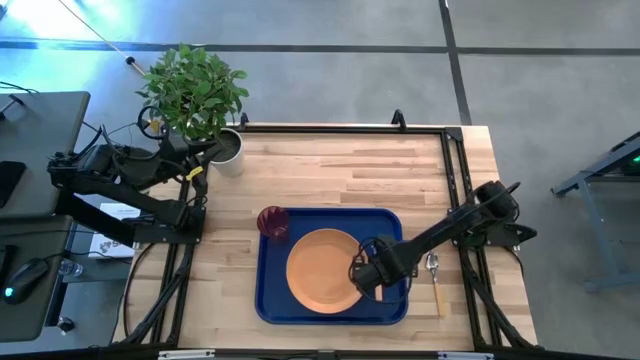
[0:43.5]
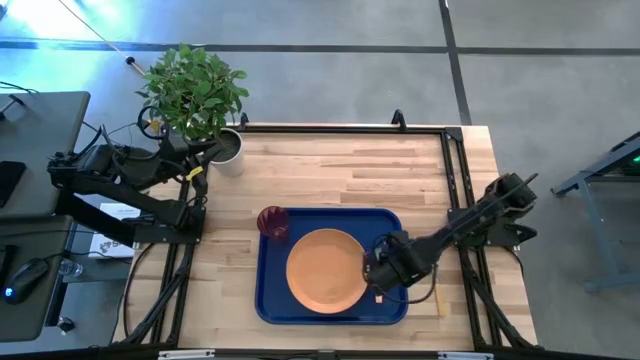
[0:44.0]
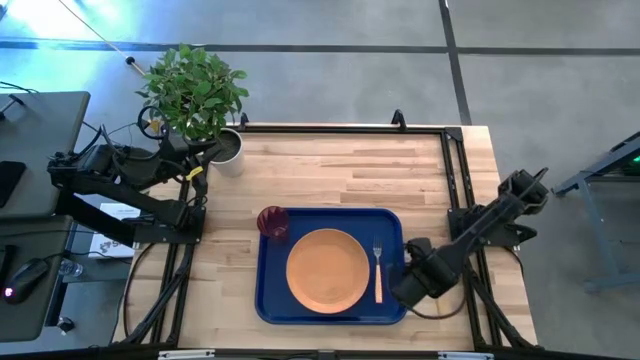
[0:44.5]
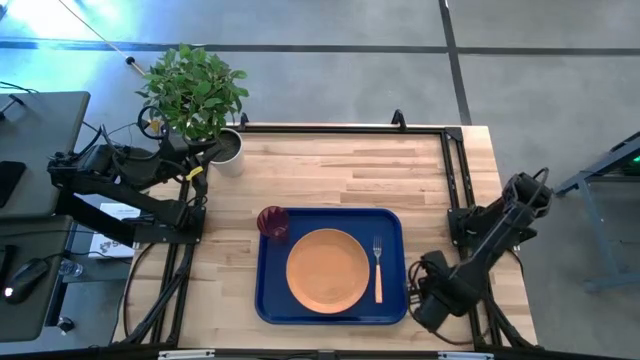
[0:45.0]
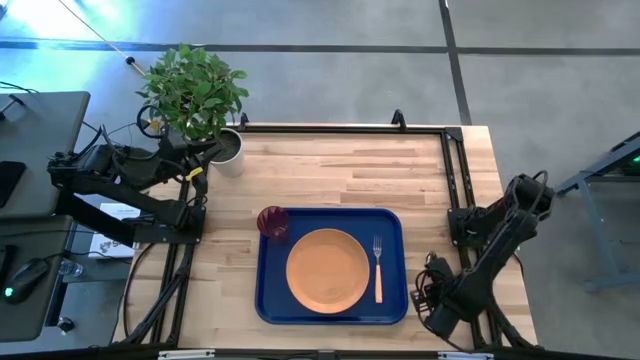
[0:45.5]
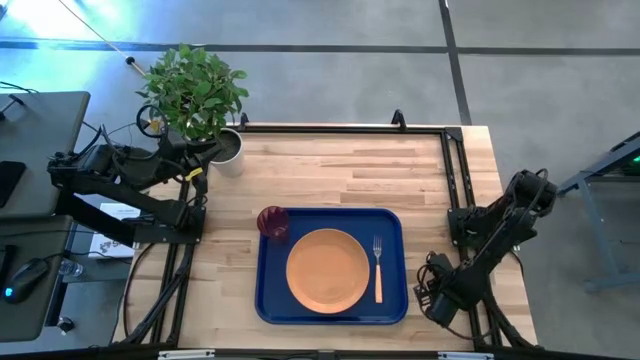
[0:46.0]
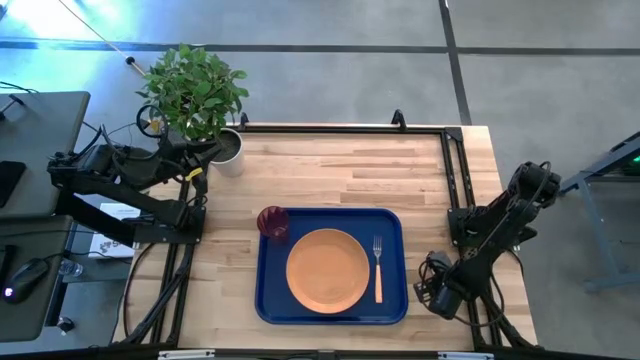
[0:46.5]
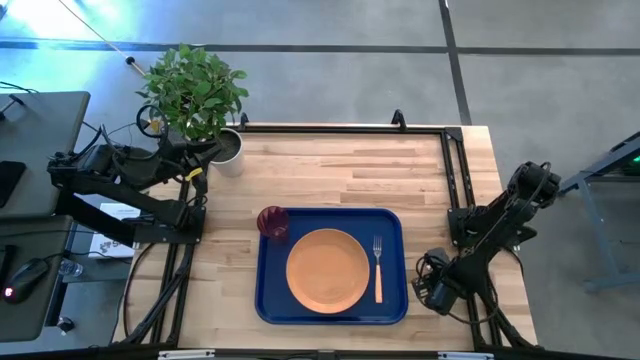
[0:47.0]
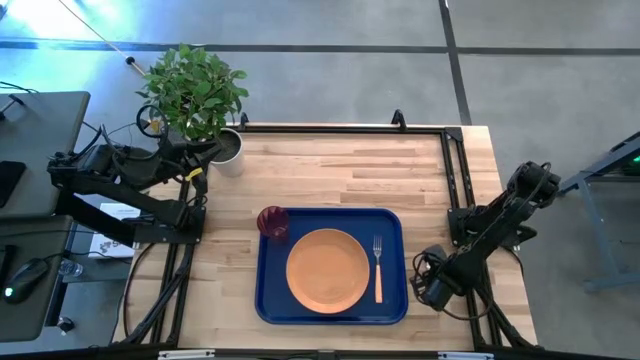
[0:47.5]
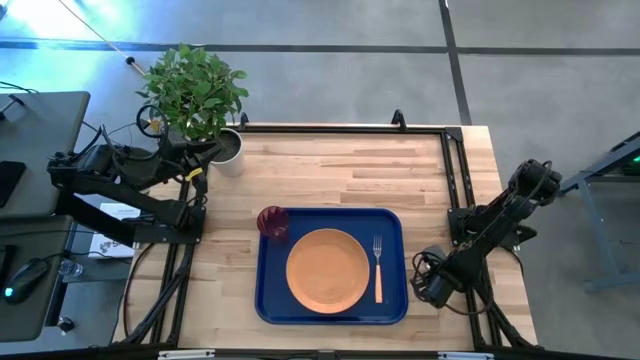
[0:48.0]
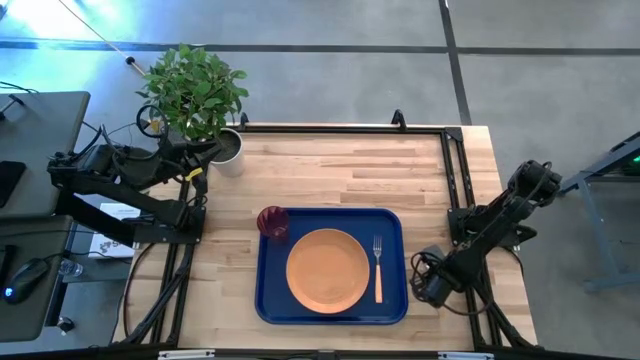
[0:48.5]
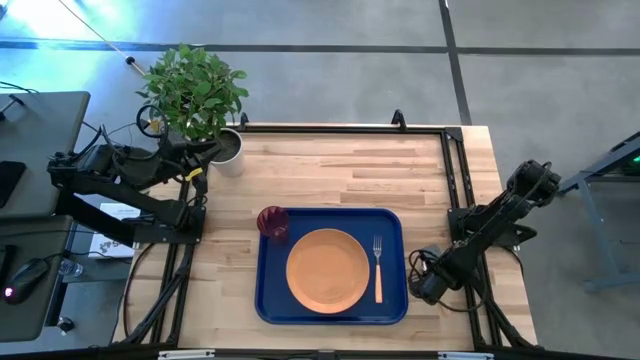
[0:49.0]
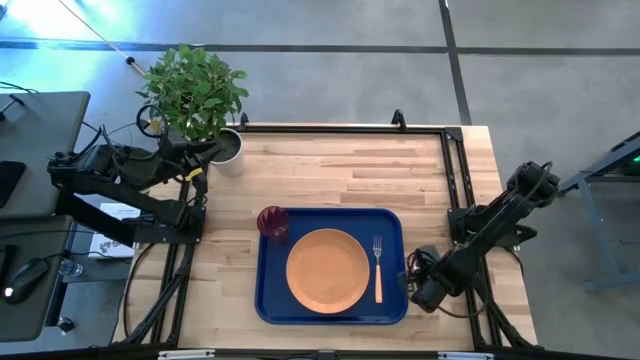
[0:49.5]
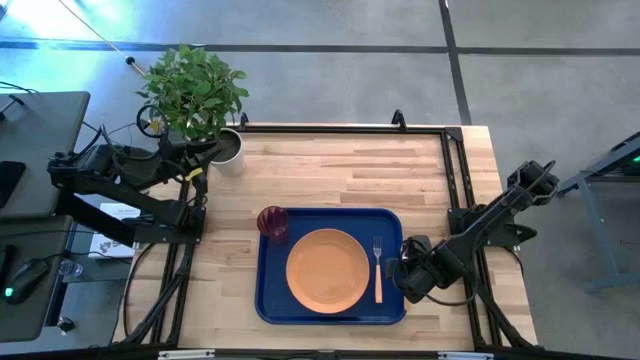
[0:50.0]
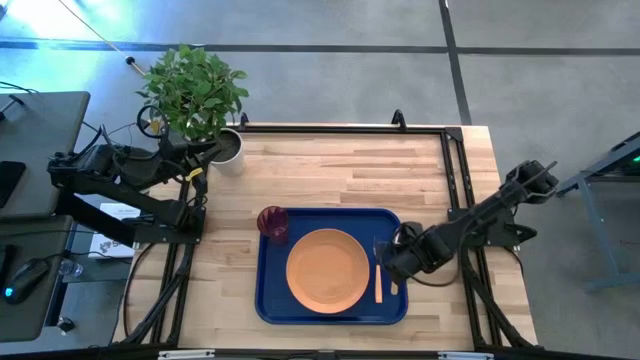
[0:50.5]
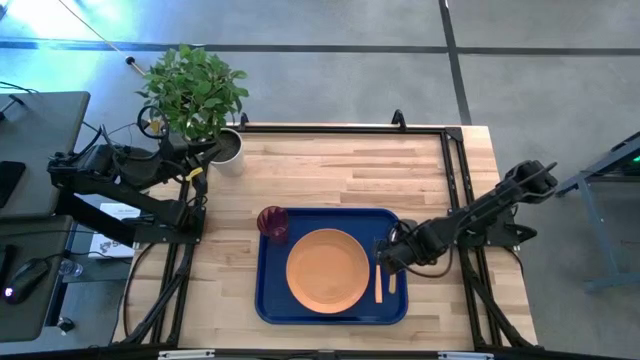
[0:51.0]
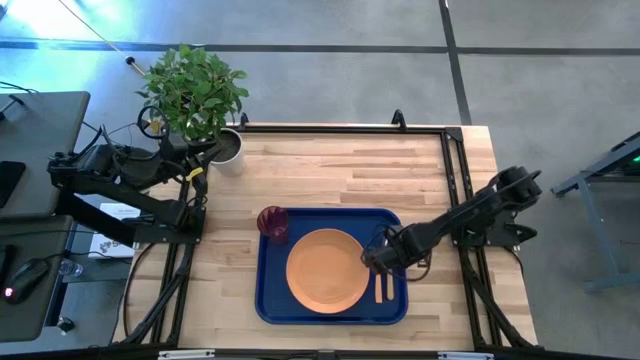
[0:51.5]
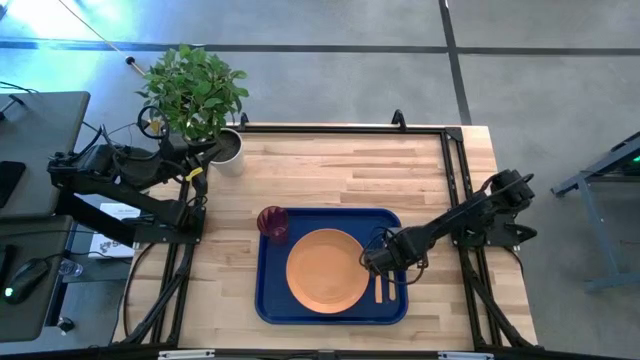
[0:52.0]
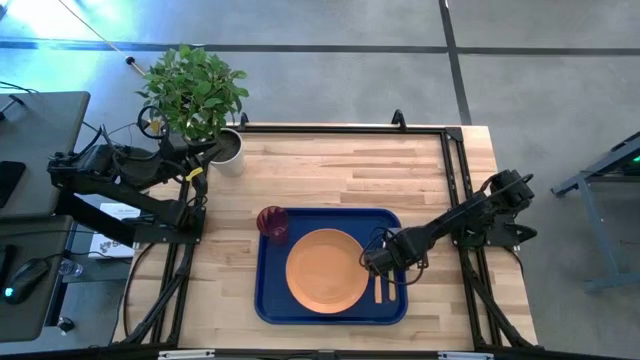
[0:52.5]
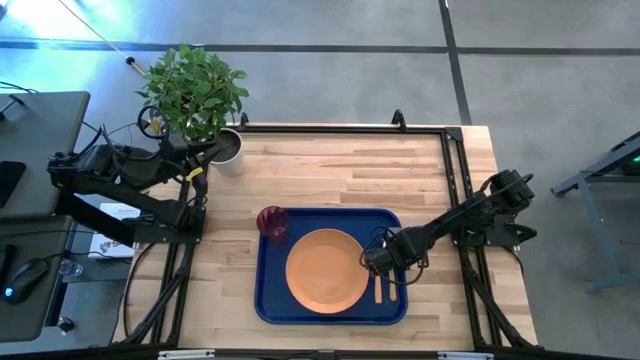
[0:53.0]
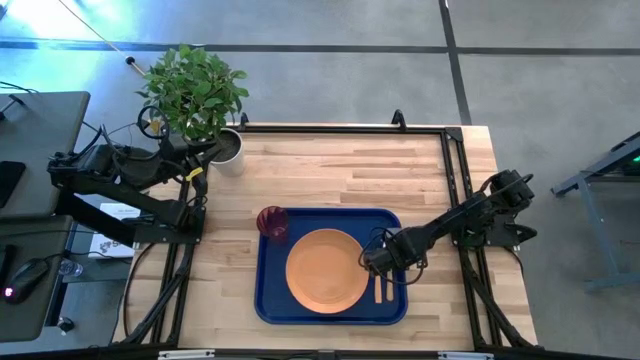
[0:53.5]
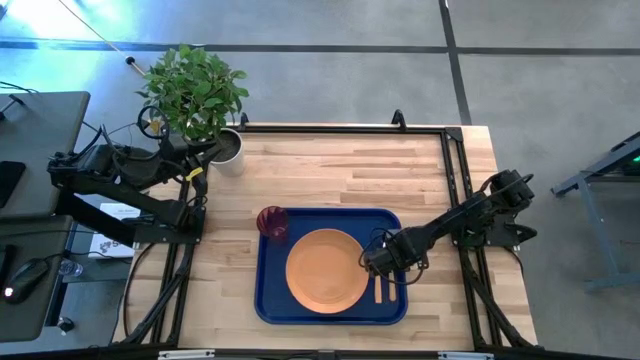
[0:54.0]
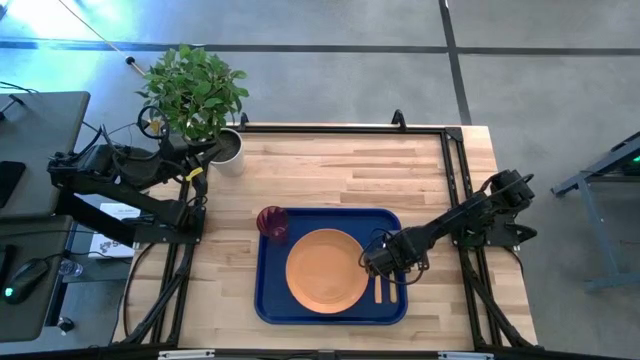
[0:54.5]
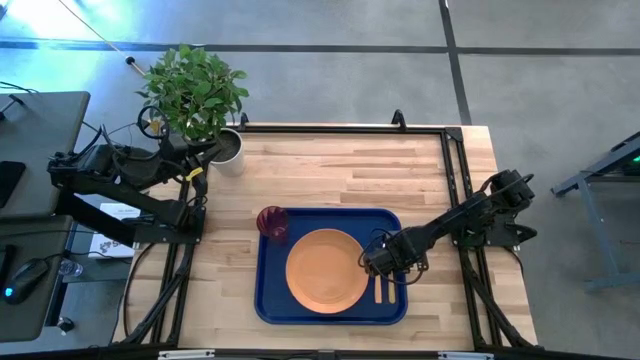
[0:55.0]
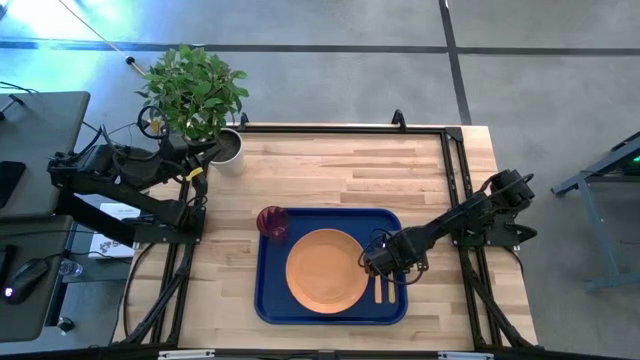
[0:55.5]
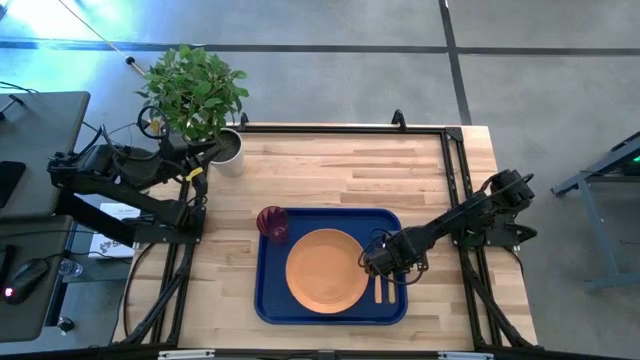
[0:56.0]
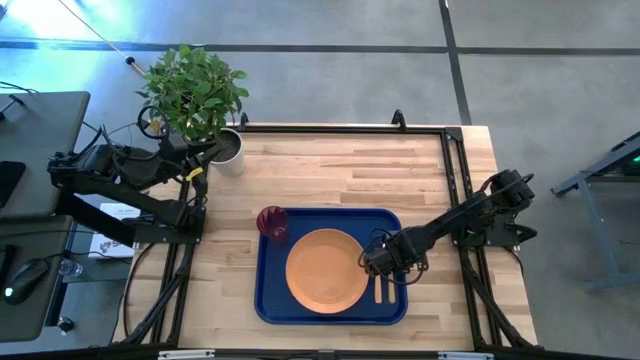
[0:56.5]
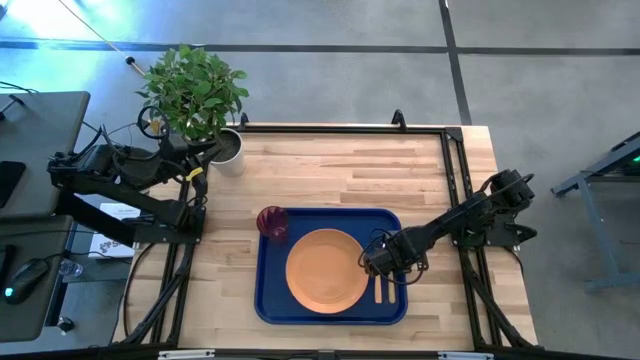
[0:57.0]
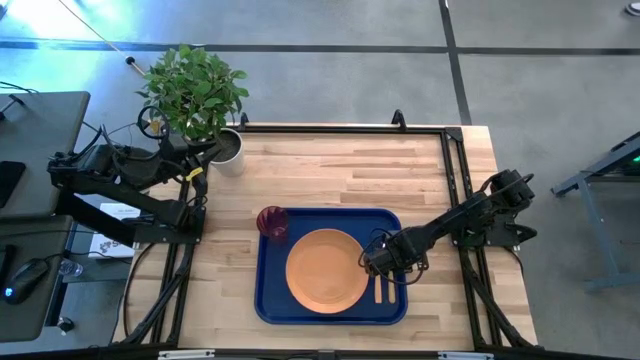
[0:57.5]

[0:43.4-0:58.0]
Task: Pick and place plate/cup/fork/spoon on tray
Put the orange spoon on the right side of the light orange fork

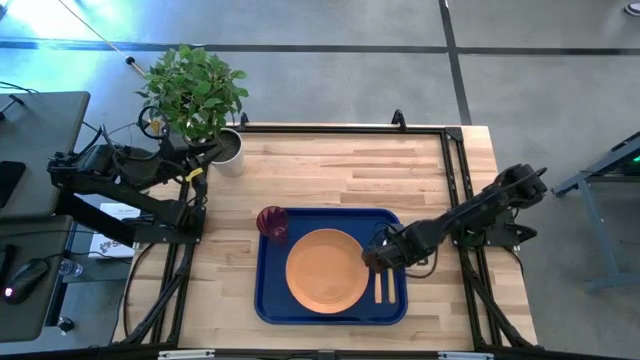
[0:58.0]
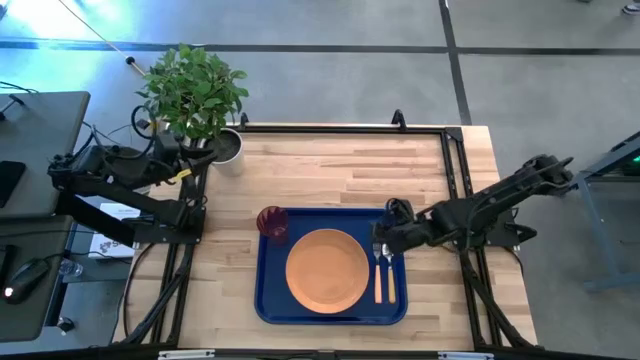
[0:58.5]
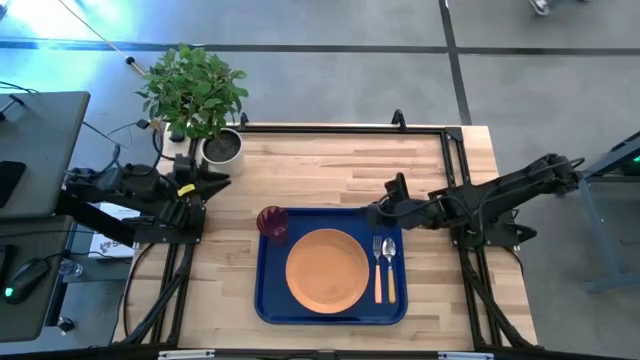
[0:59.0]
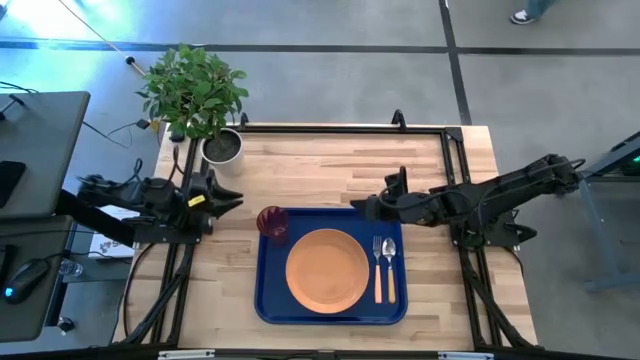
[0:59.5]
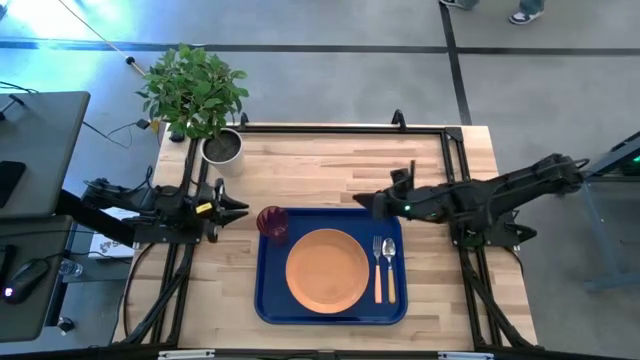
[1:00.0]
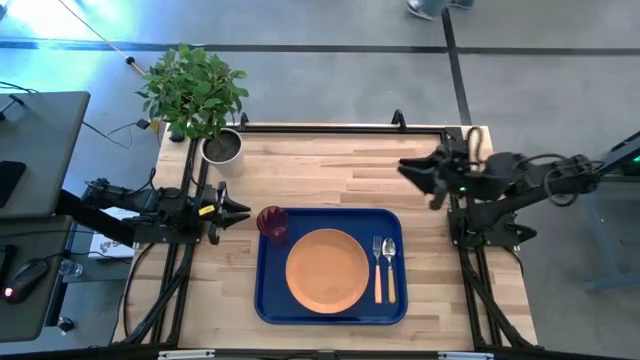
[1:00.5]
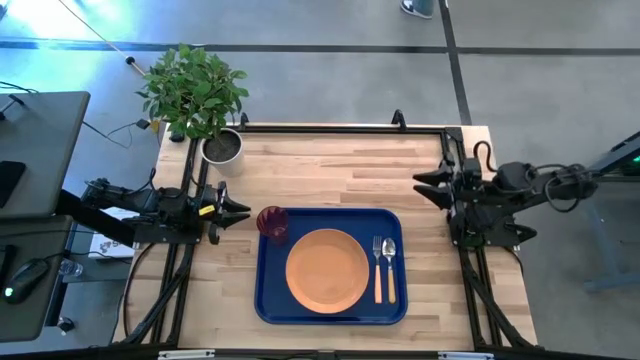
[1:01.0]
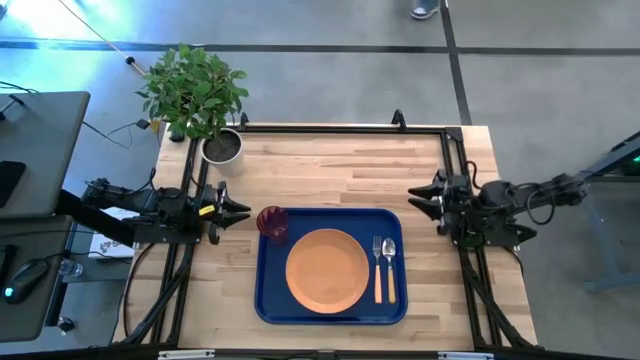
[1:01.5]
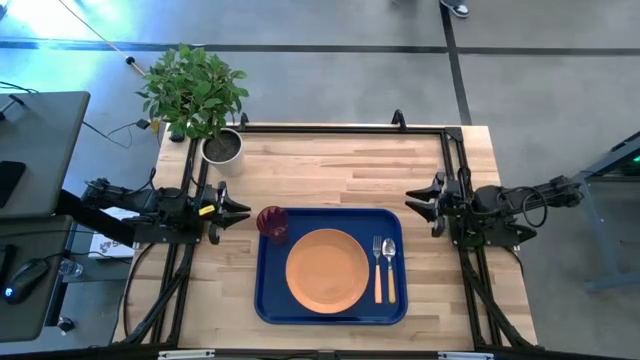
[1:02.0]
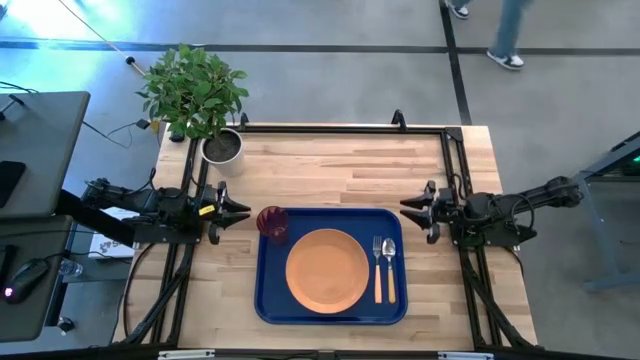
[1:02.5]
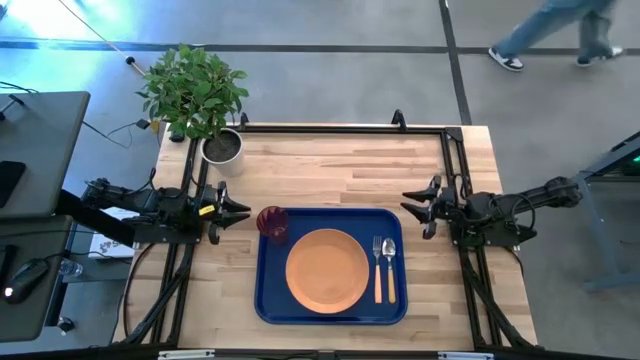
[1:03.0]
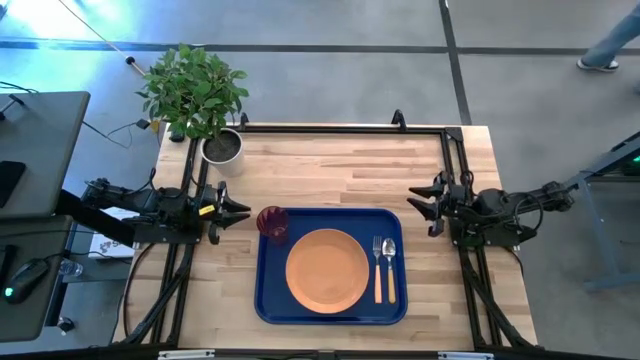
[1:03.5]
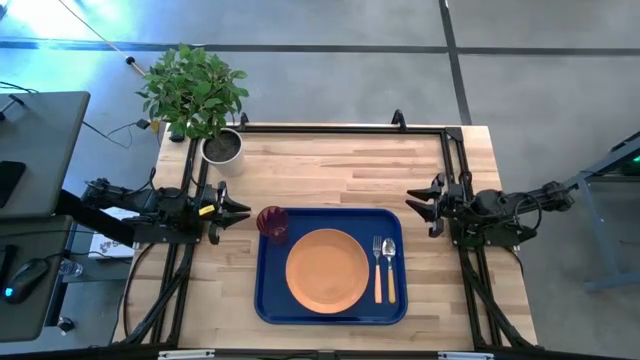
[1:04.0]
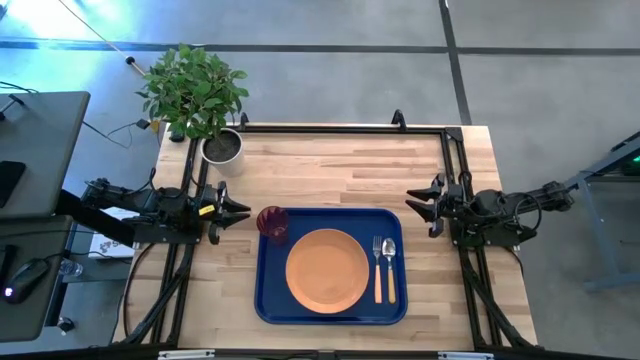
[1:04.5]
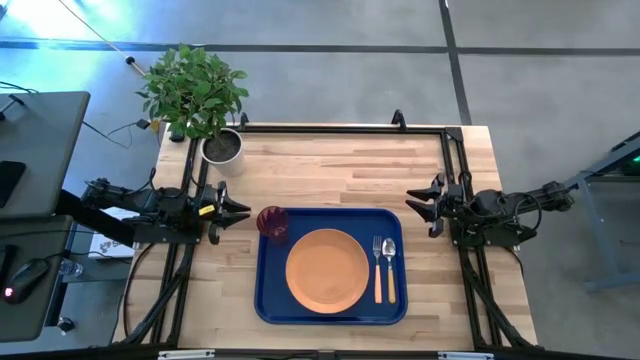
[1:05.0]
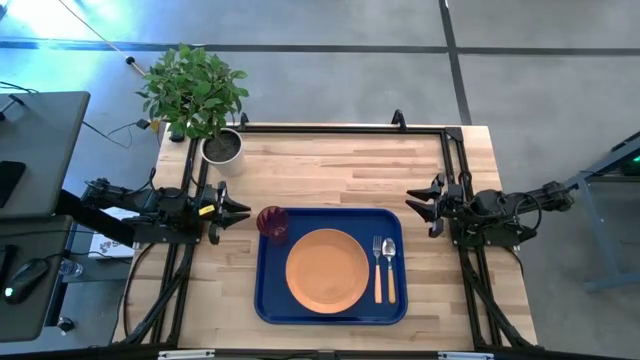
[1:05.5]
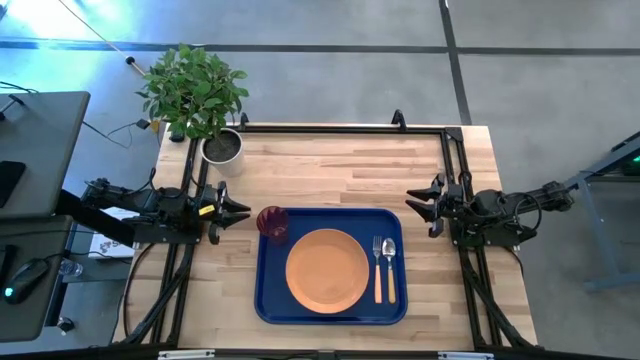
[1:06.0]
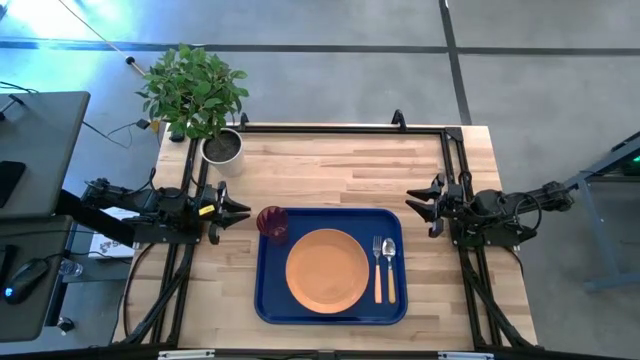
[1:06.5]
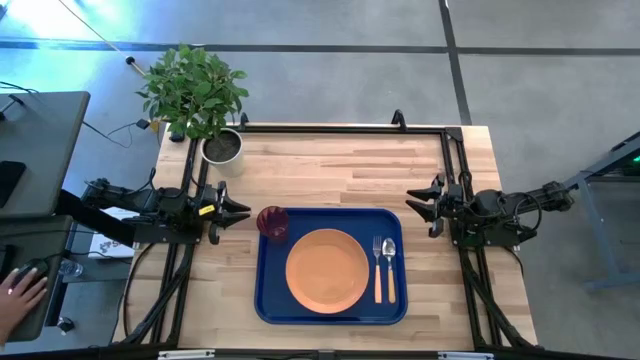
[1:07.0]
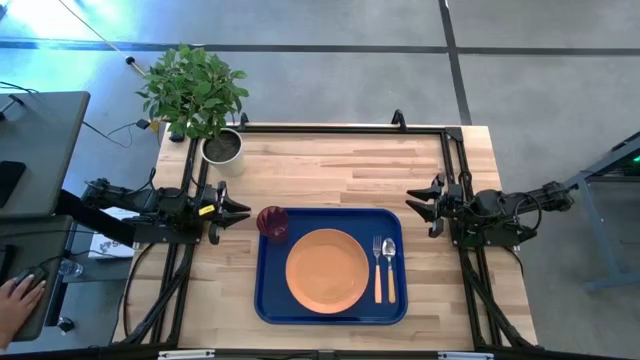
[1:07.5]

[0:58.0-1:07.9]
Return to Home Position
